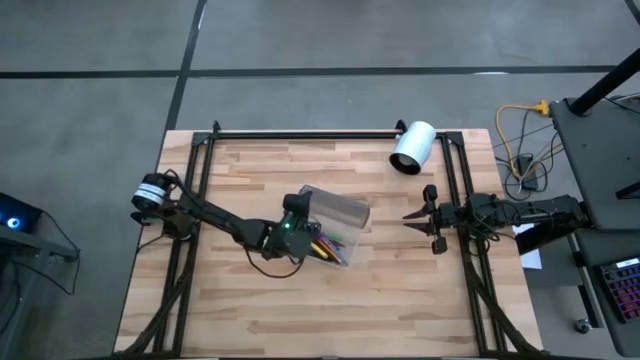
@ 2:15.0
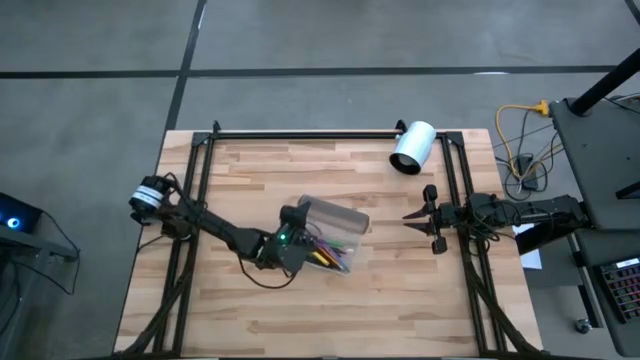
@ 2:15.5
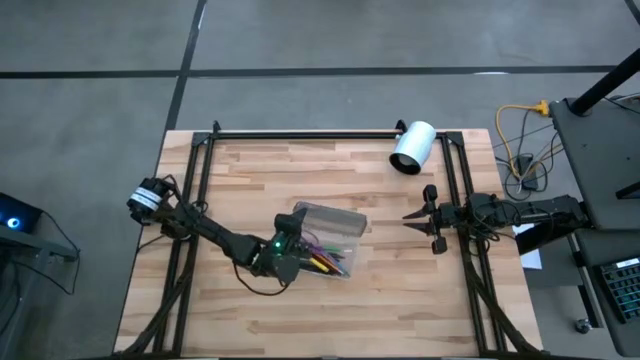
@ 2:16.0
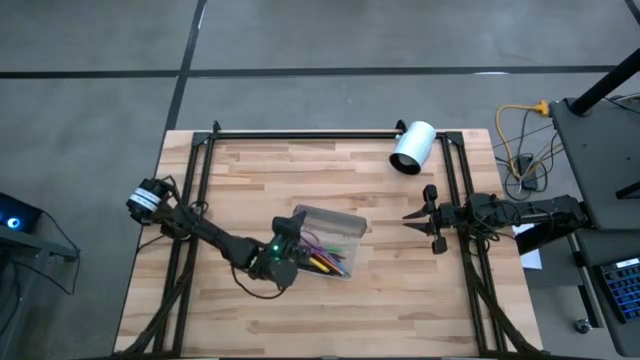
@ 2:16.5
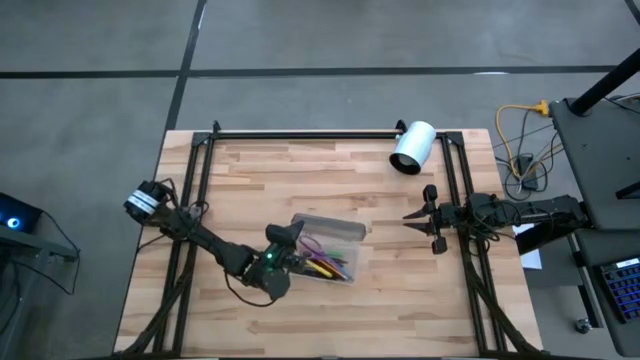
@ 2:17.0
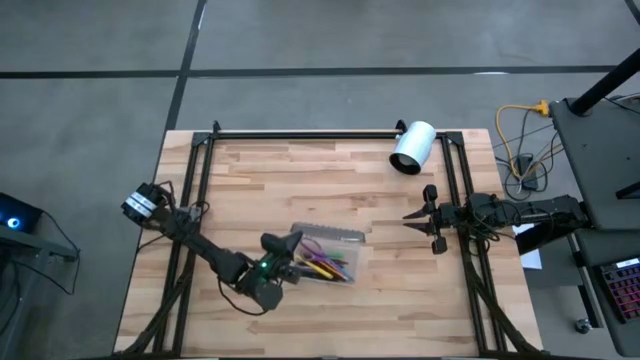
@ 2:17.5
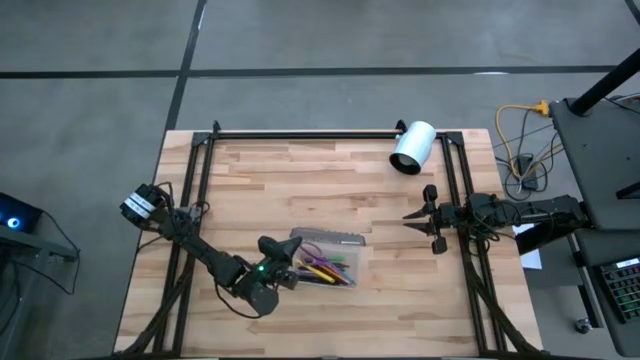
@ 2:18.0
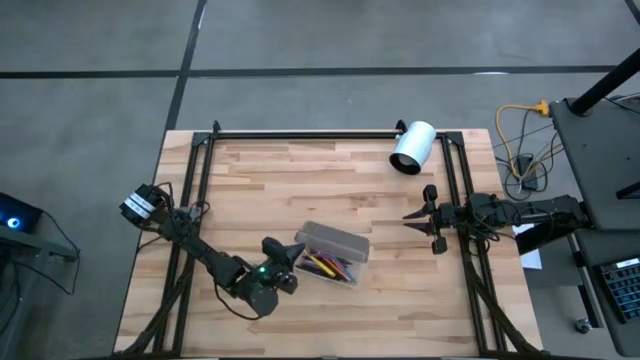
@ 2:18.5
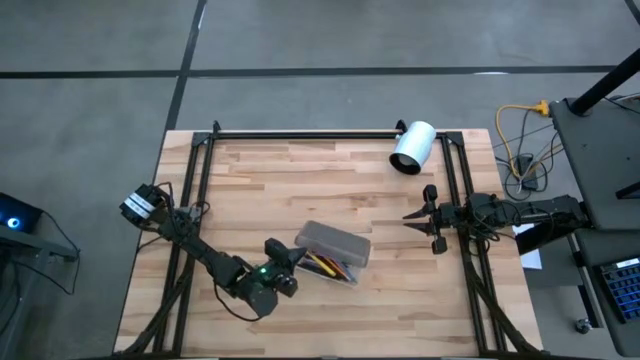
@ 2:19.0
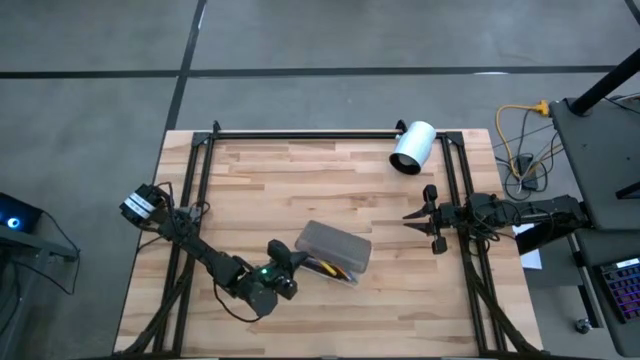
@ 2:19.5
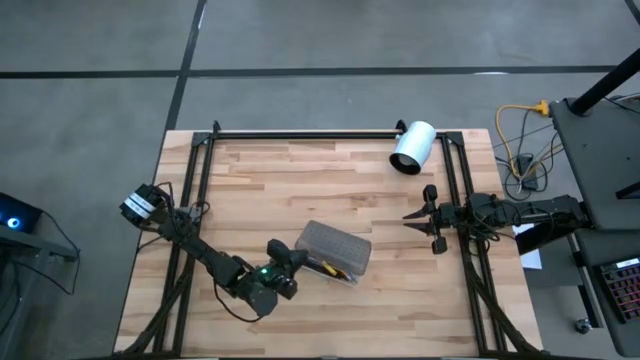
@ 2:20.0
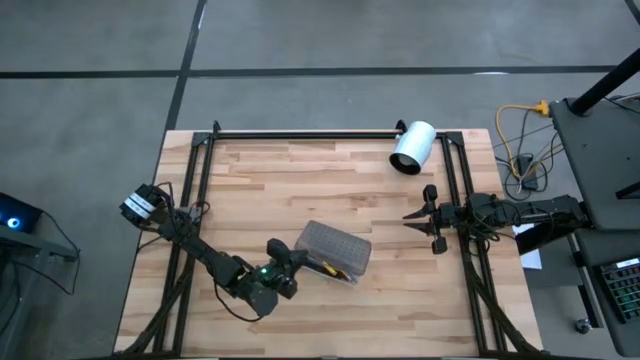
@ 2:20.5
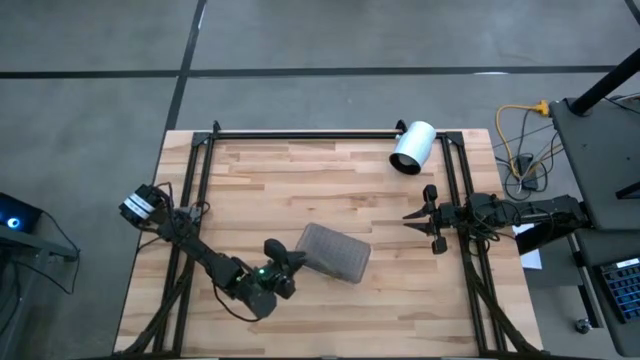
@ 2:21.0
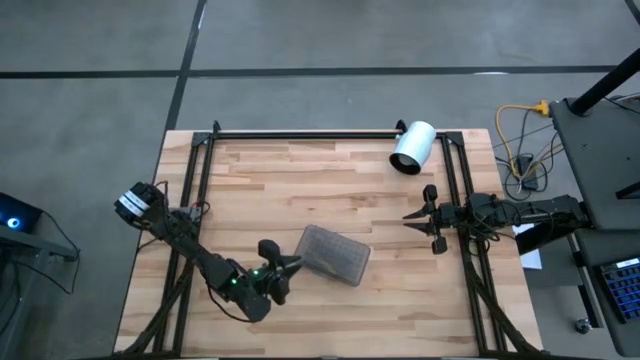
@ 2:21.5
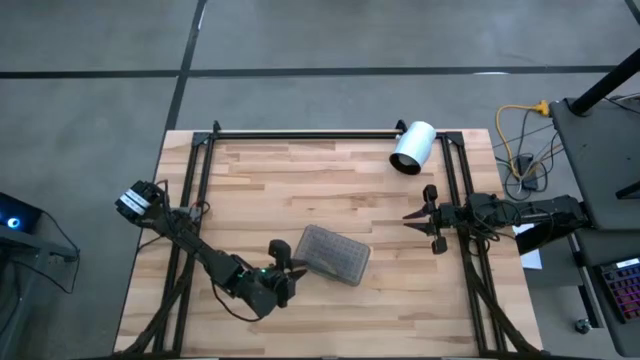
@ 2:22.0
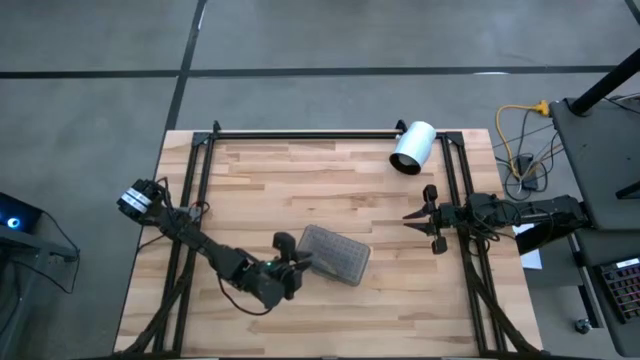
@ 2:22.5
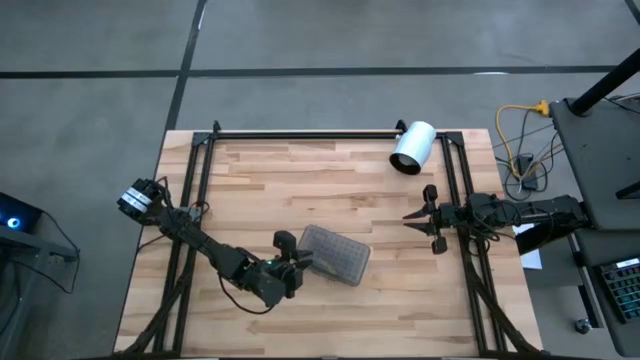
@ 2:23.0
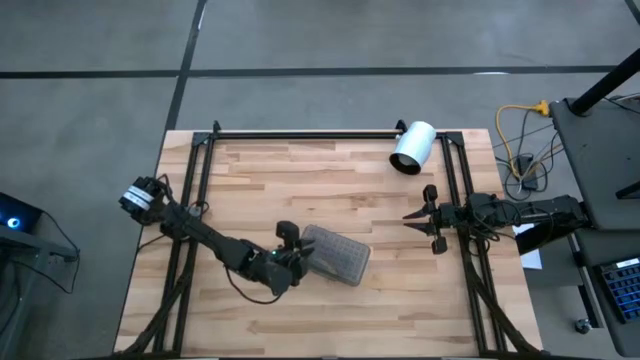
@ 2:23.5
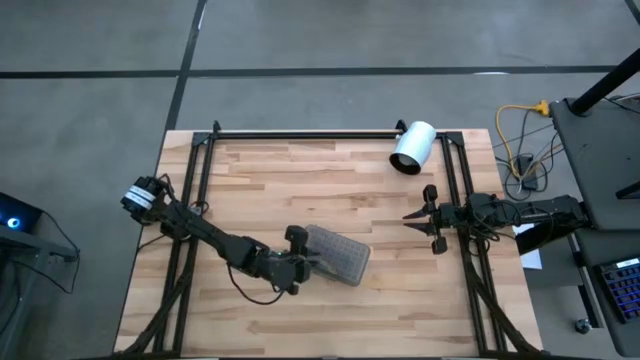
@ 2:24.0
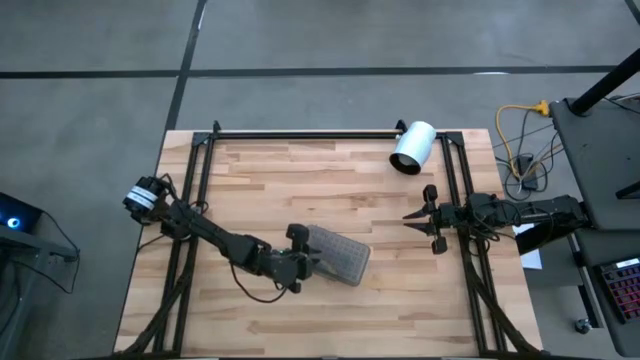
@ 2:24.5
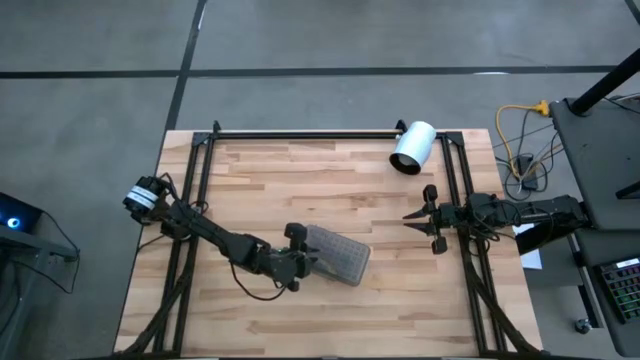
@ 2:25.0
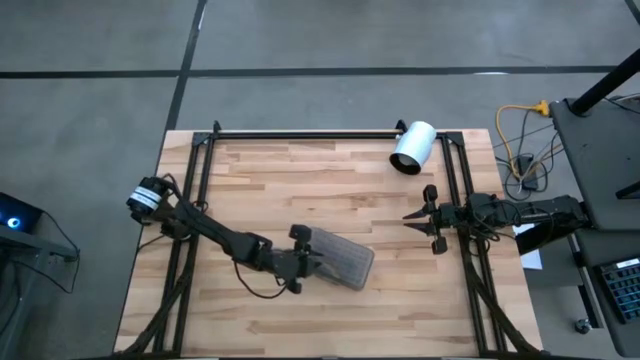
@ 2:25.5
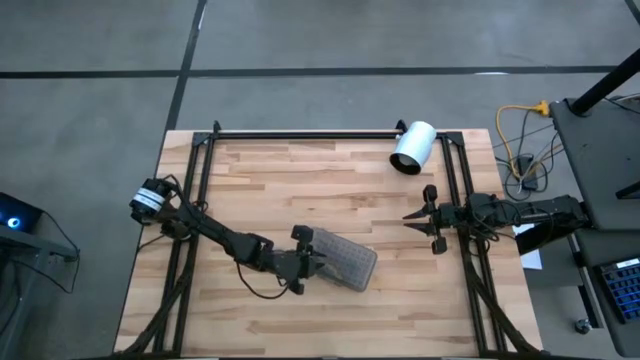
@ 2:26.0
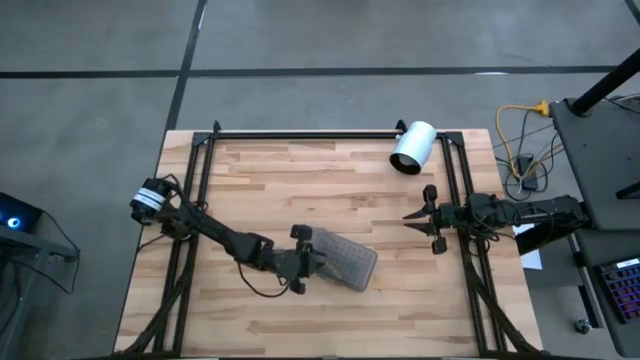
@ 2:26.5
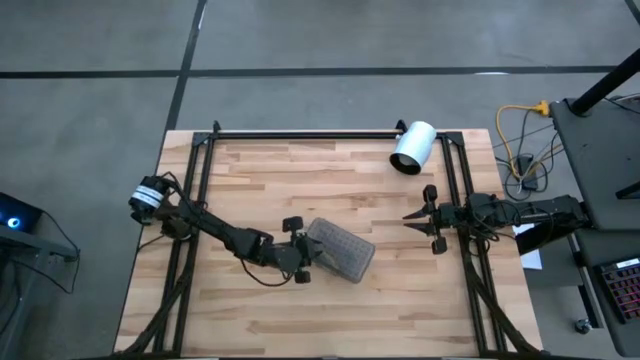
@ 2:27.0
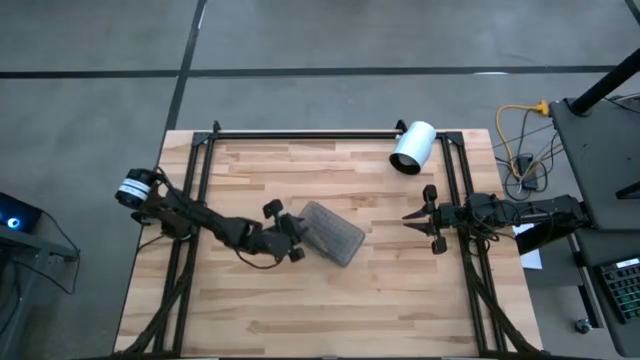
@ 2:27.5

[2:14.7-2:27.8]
Task: Pick & place school supplies into a supply box
Close the white and black supply box

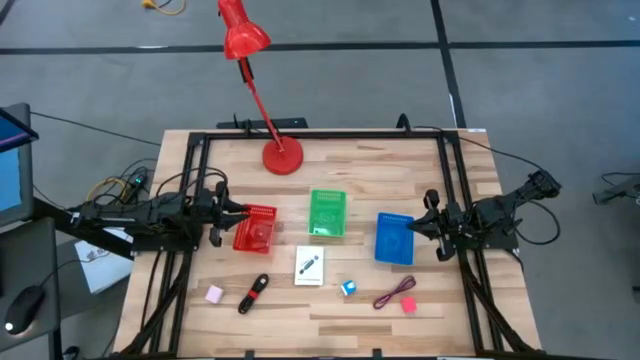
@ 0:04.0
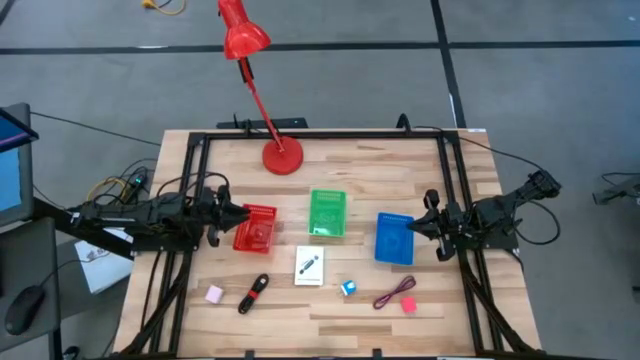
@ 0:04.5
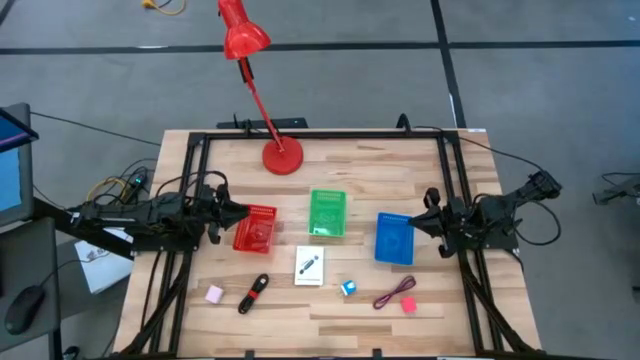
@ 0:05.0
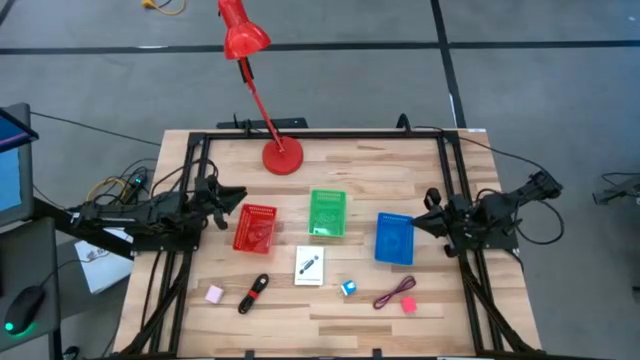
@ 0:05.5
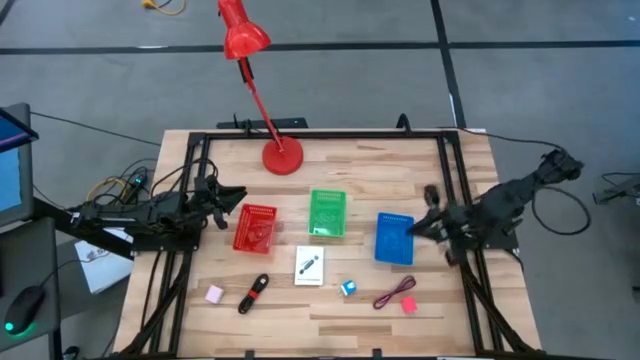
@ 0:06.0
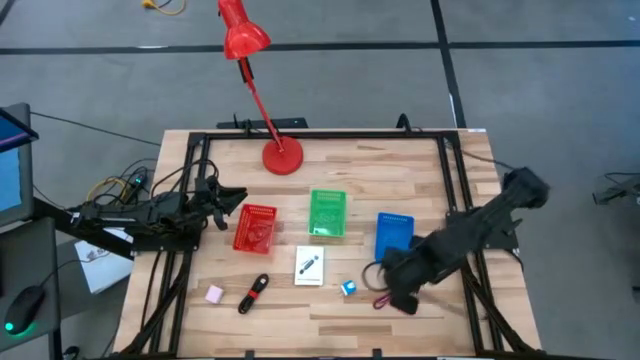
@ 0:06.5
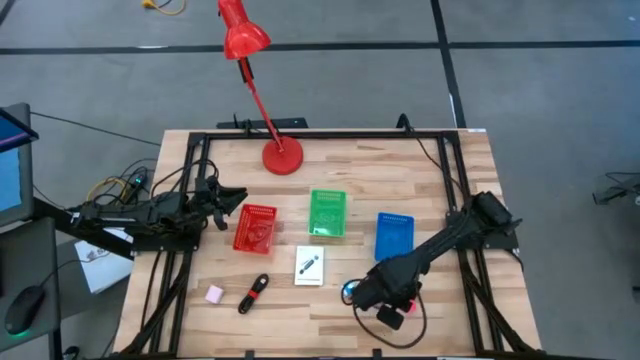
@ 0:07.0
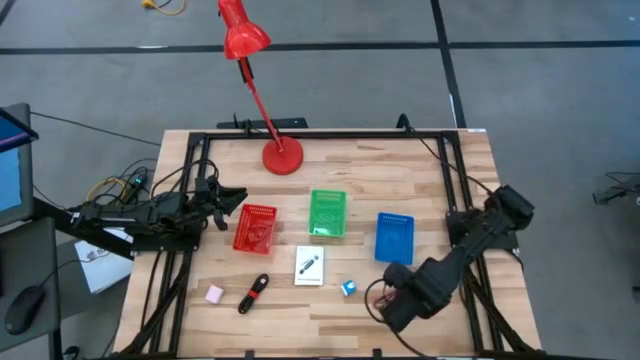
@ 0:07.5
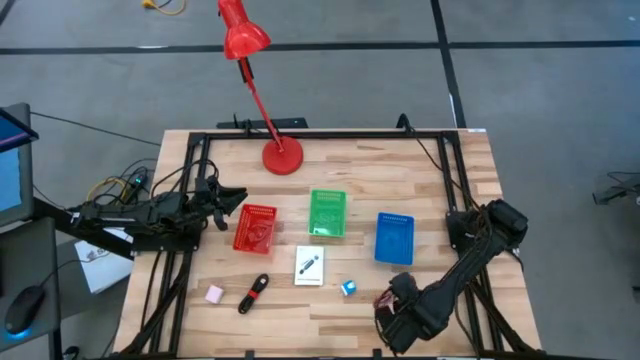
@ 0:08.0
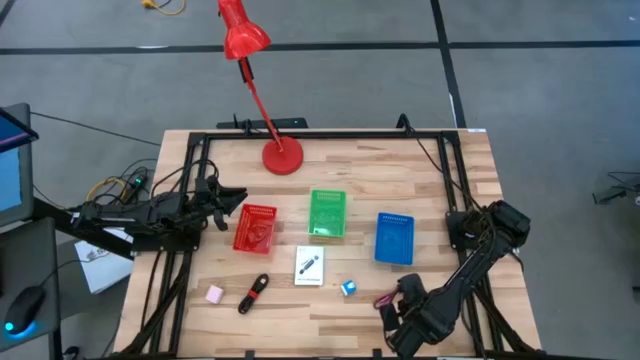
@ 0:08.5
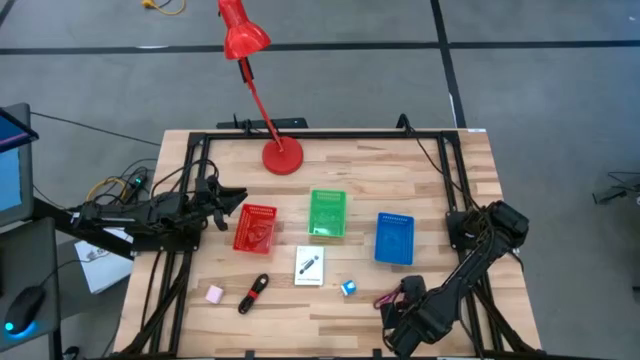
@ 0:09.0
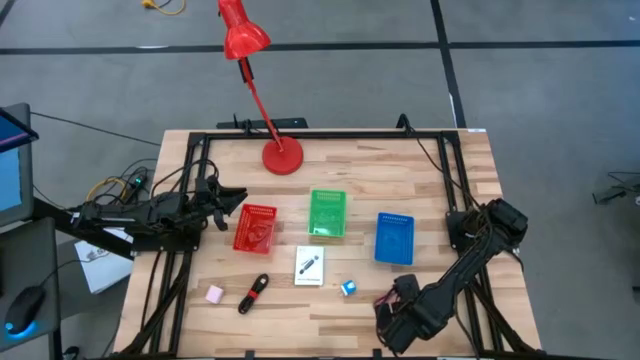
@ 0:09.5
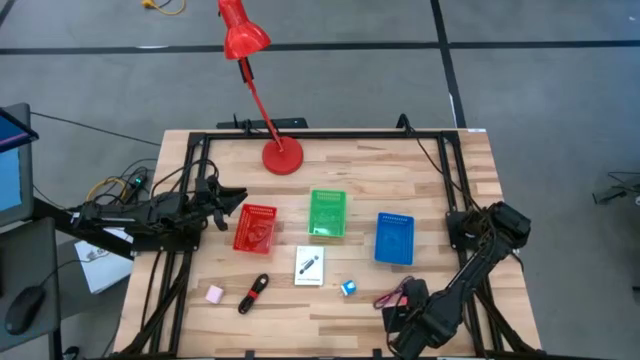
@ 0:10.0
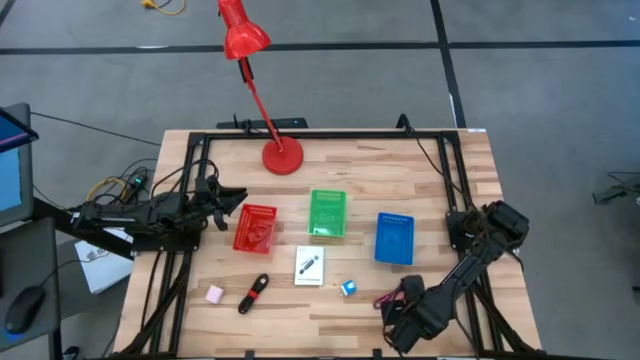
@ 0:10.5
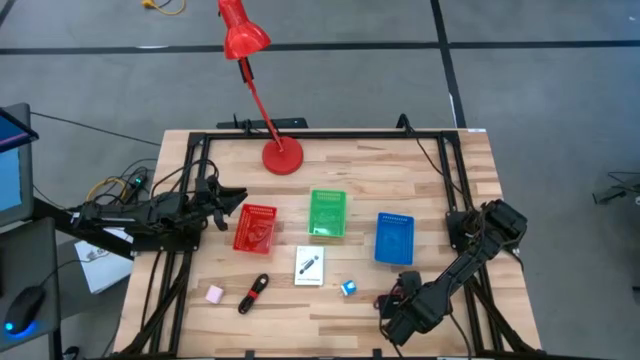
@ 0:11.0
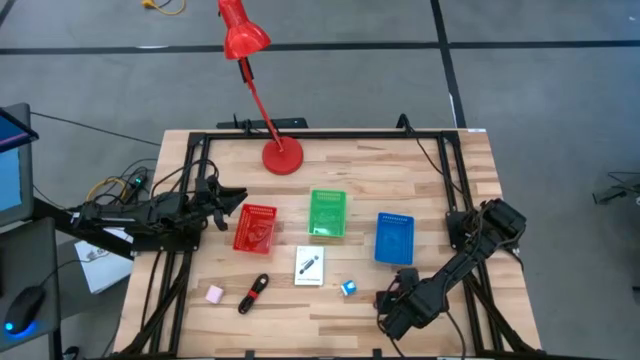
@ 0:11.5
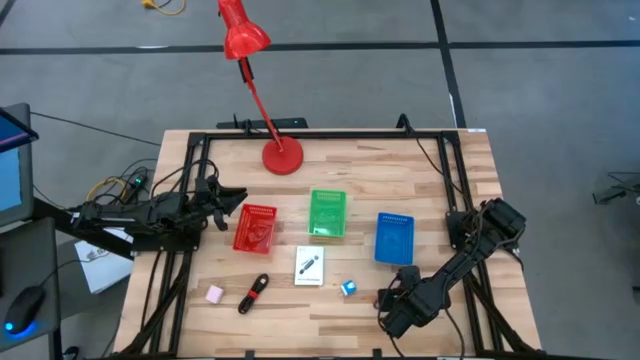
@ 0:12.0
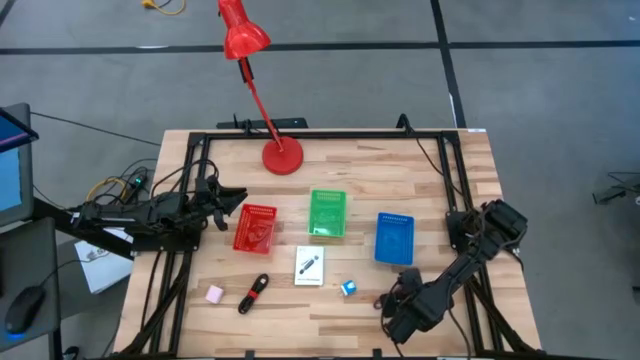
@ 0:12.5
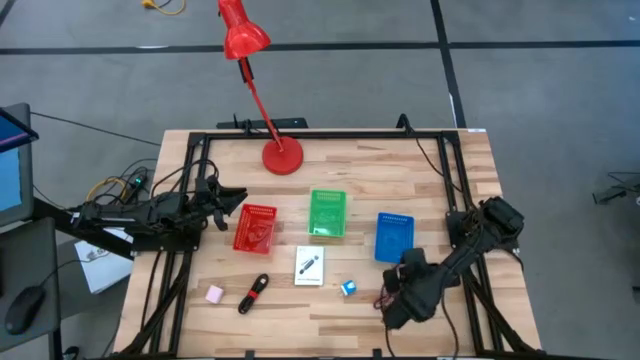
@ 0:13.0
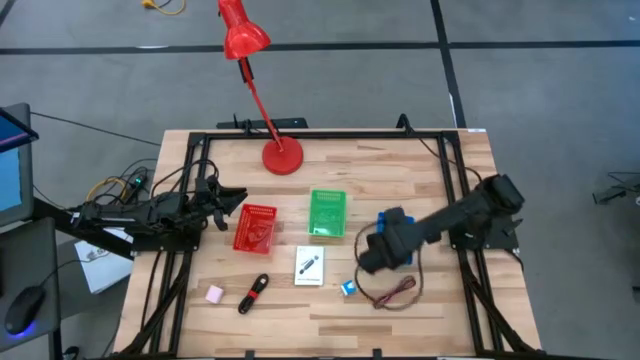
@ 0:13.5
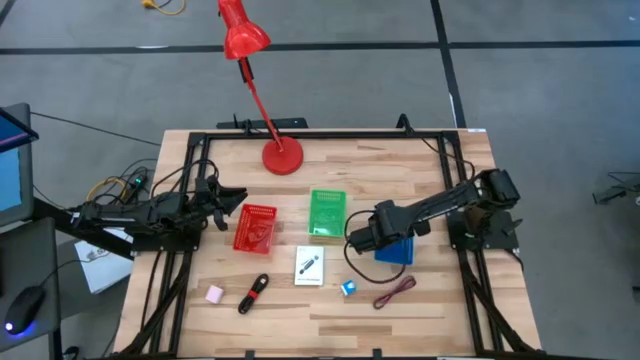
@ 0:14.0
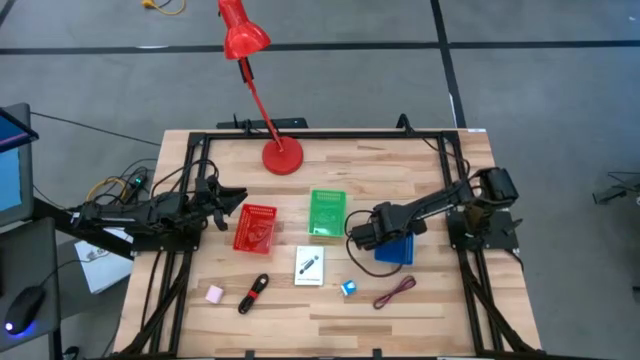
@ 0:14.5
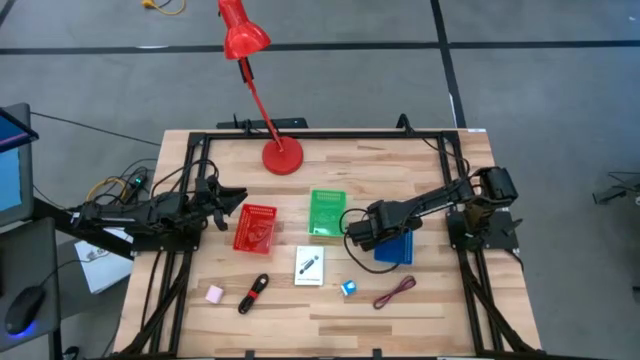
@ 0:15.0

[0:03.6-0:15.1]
Task: Pick and place items into bin
Put the pink charger adapter into the blue bin
